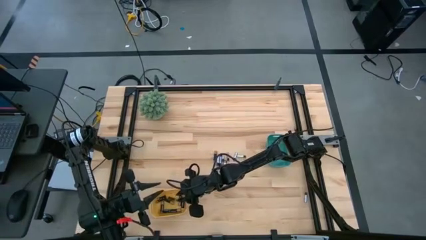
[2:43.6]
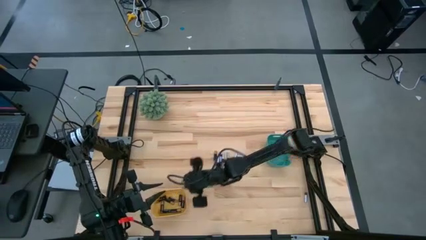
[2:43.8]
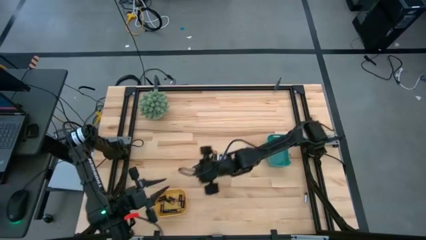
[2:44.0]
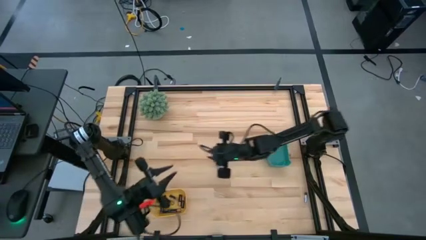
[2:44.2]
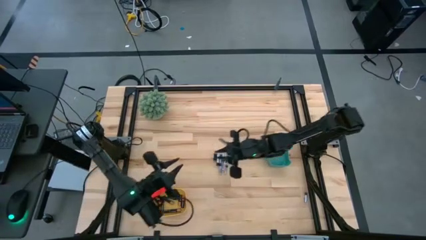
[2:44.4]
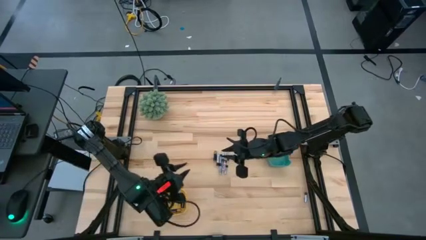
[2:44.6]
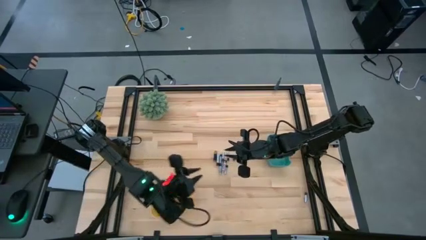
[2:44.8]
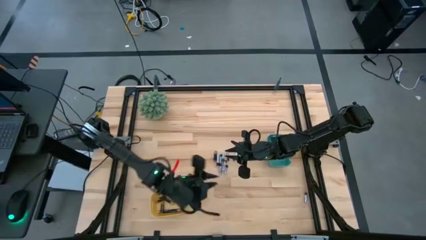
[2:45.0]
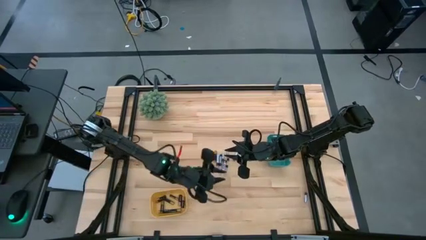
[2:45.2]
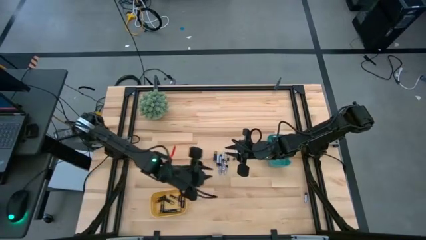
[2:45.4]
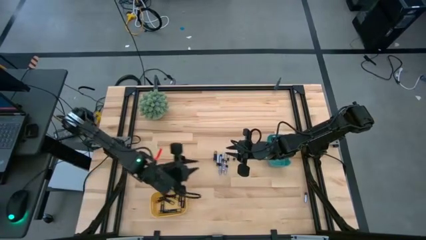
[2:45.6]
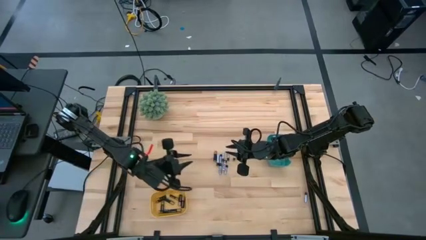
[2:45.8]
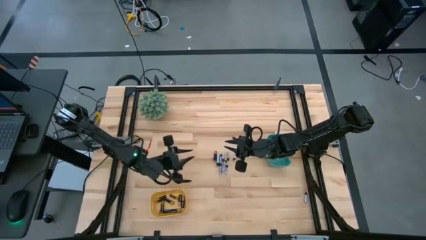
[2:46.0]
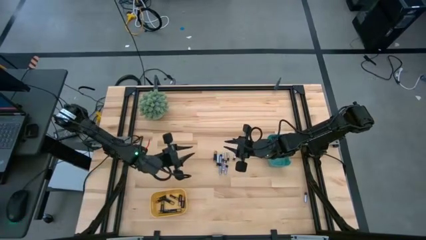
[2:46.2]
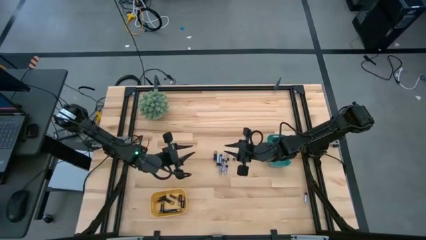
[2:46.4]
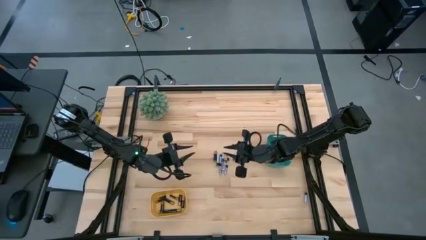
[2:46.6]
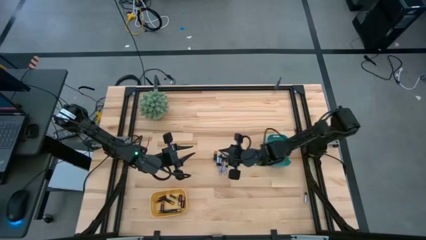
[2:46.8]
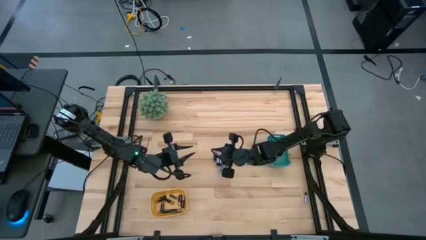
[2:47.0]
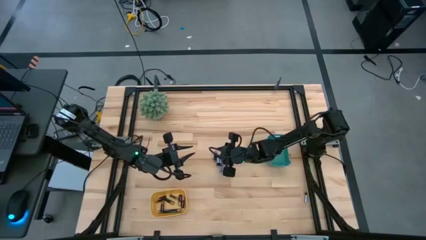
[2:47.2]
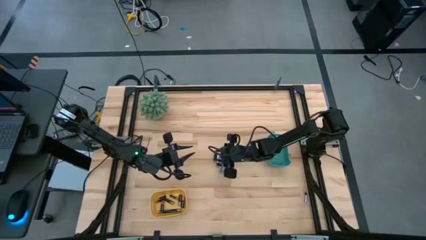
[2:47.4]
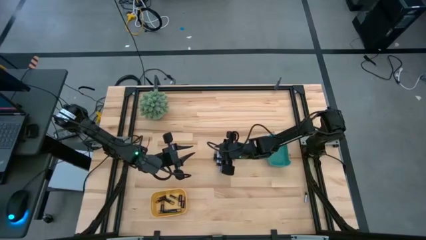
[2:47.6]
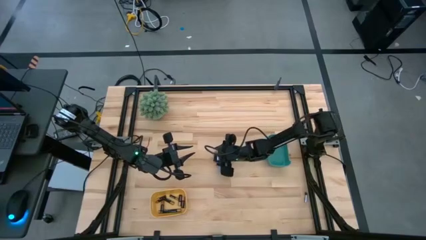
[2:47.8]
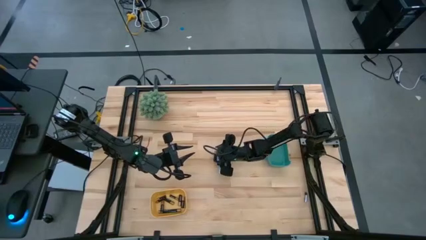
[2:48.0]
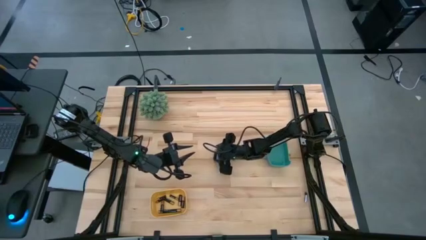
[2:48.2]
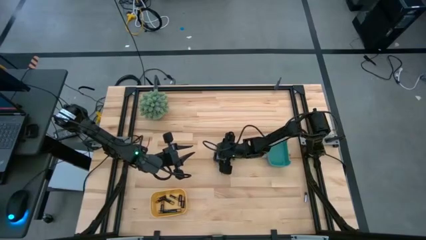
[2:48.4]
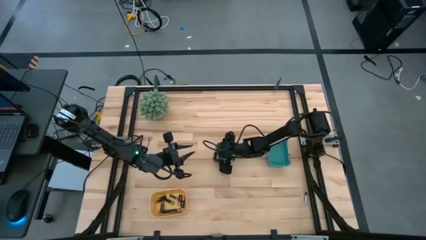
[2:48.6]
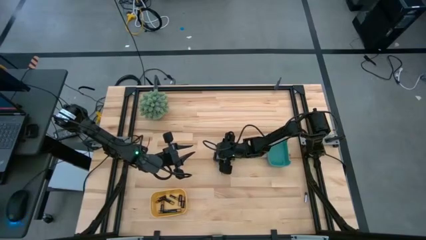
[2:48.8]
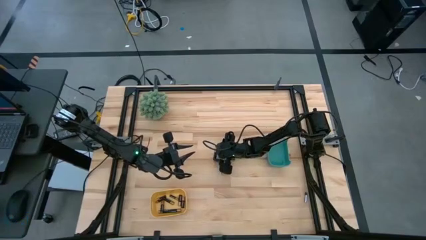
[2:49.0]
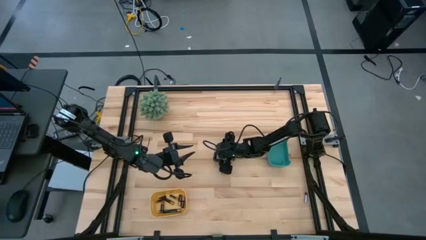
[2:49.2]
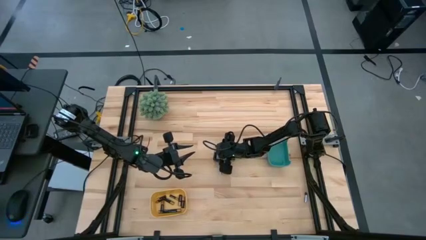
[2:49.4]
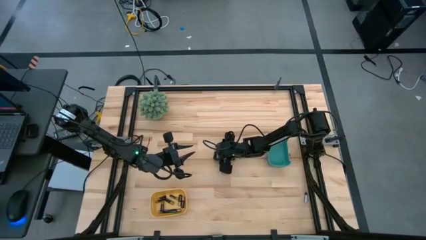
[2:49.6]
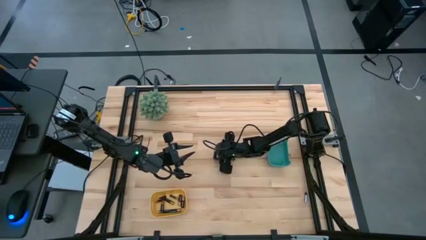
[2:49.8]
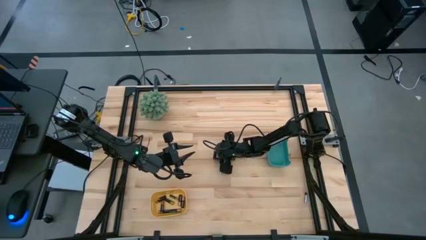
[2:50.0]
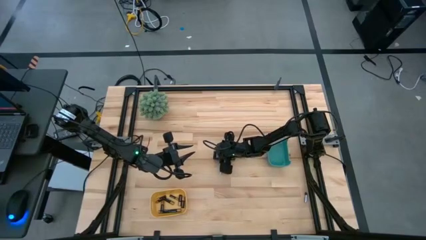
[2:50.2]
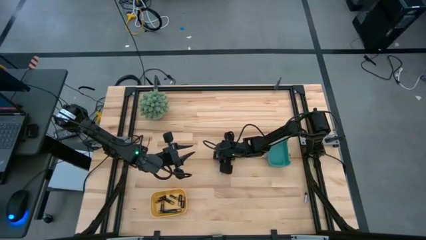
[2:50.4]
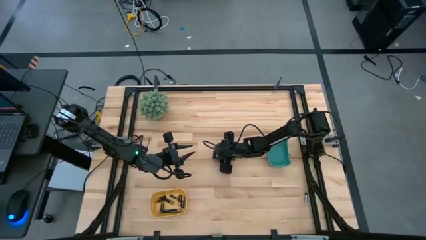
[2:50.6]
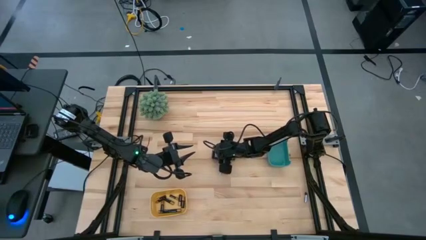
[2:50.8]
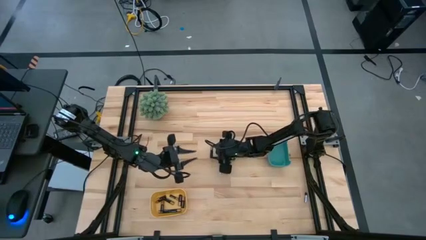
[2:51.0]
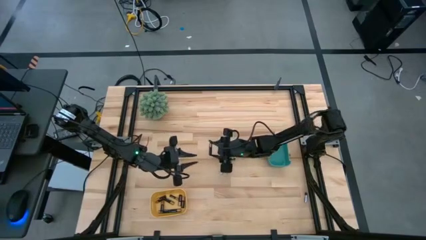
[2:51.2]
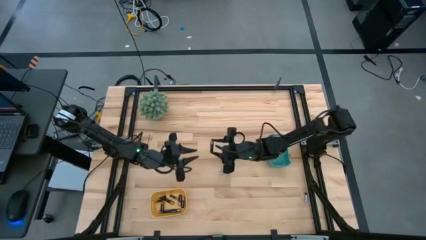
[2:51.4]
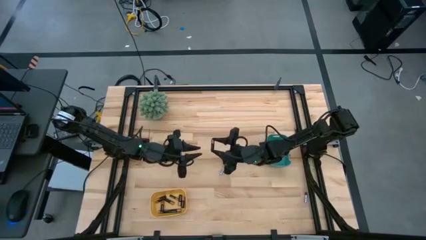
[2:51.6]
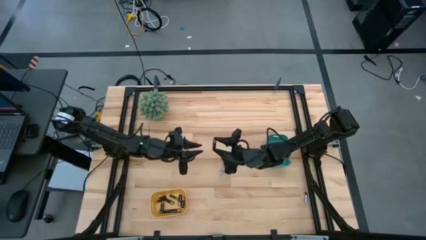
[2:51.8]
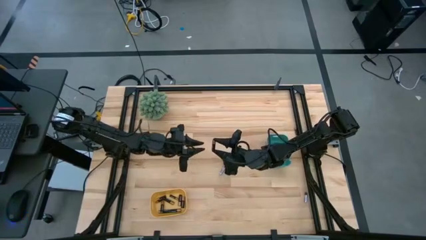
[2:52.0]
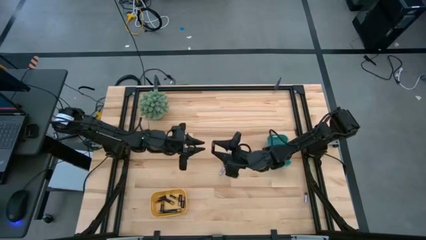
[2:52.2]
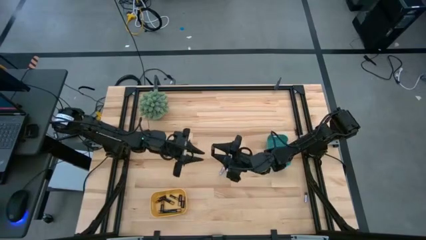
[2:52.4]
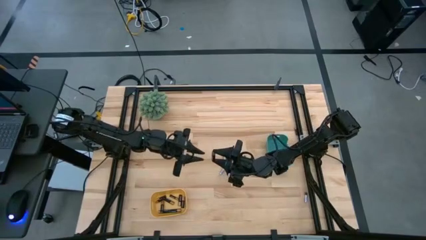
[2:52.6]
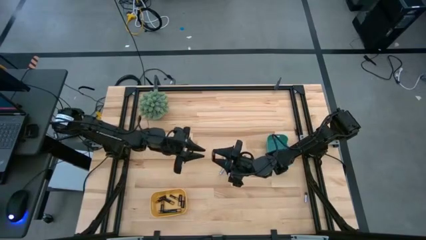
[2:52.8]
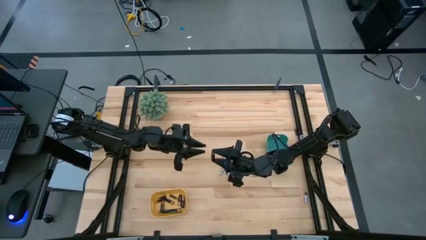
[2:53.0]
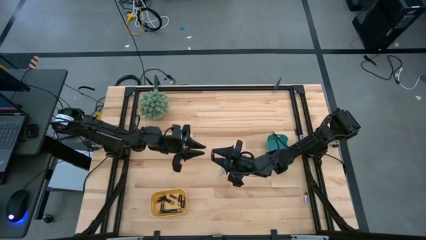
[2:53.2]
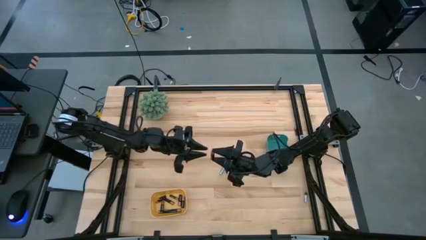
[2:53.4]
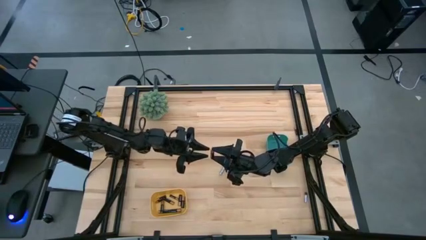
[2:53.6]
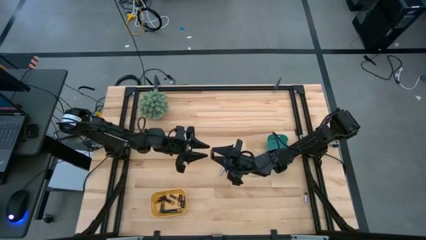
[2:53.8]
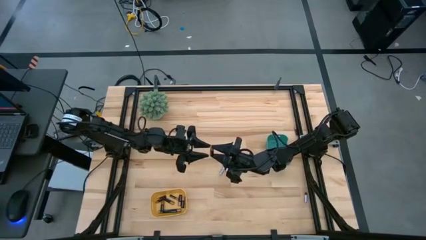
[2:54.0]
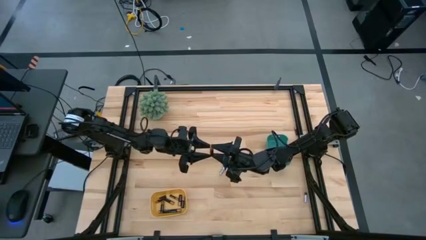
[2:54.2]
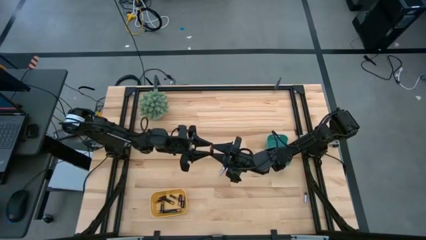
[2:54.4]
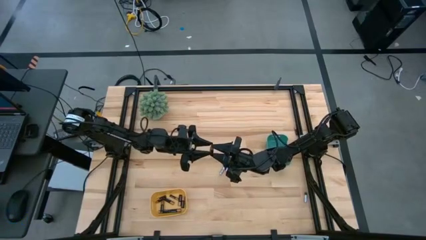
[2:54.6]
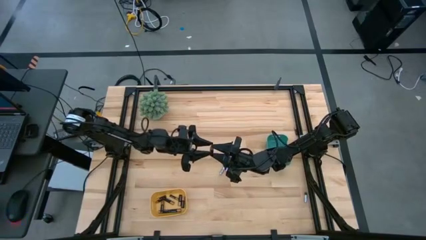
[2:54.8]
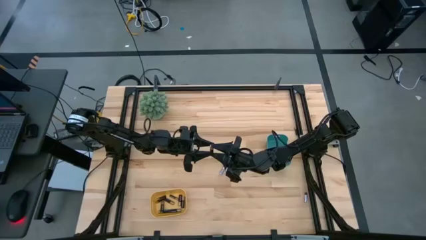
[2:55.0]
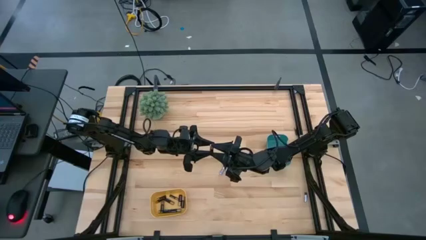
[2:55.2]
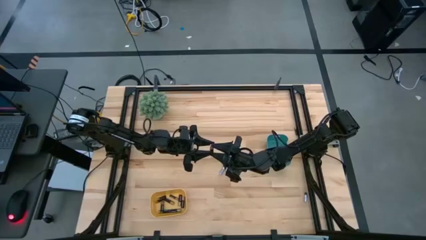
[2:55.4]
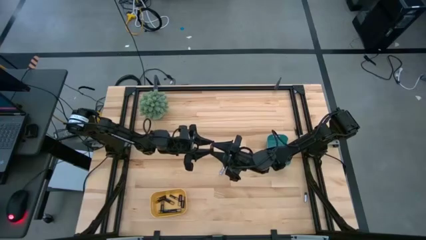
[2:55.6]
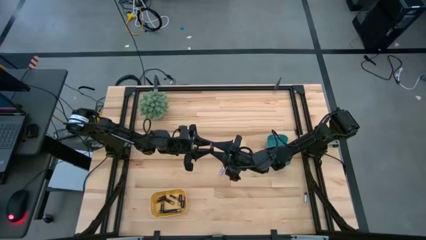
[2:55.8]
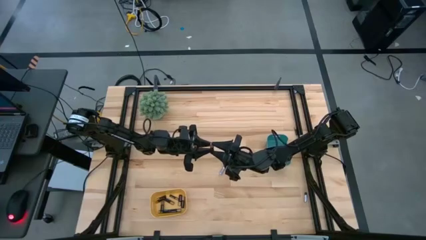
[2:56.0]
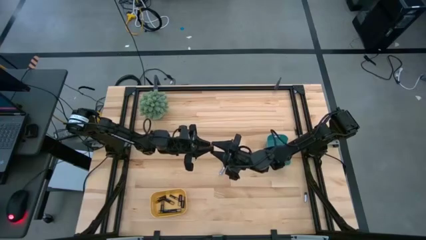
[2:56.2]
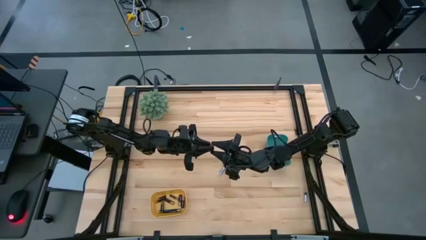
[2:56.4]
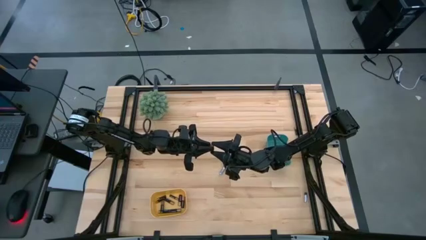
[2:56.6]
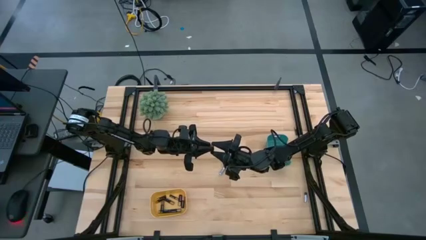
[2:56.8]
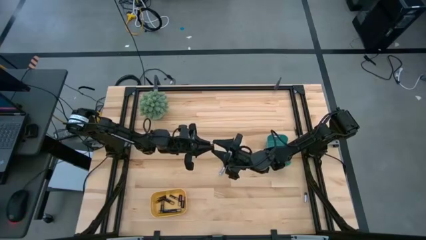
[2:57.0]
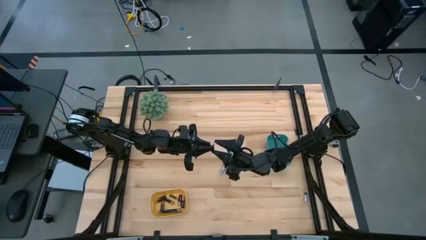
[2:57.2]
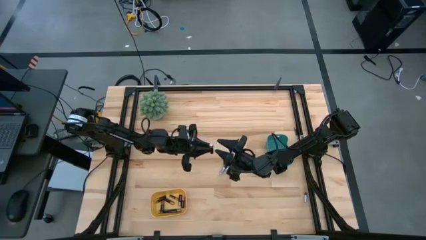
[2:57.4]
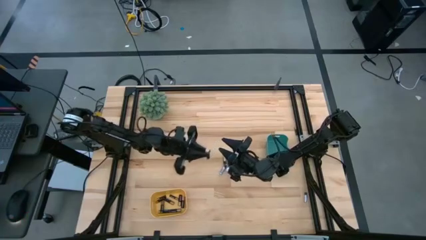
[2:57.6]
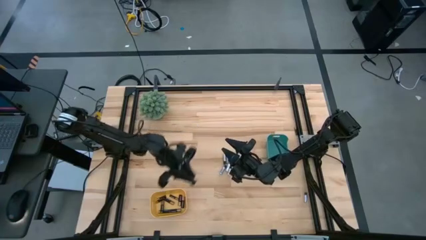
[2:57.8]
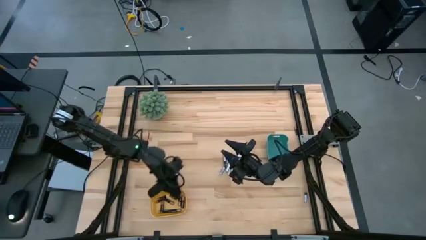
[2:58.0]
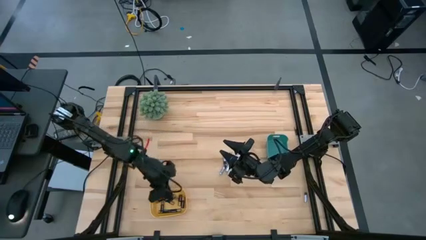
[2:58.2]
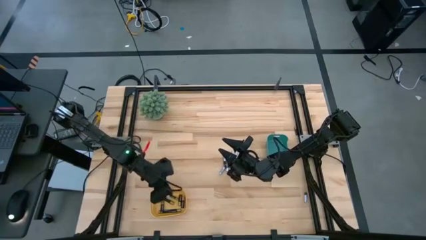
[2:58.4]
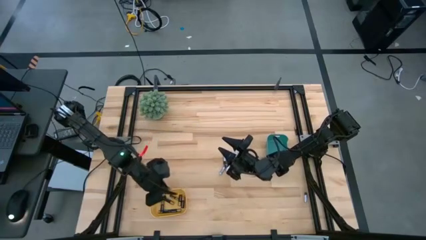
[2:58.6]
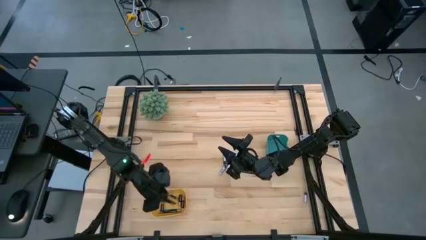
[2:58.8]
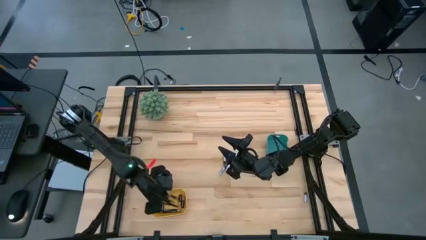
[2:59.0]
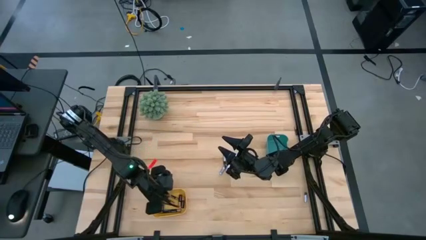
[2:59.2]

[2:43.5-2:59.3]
Task: Sort batteries
Put the black battery into the yellow bin
